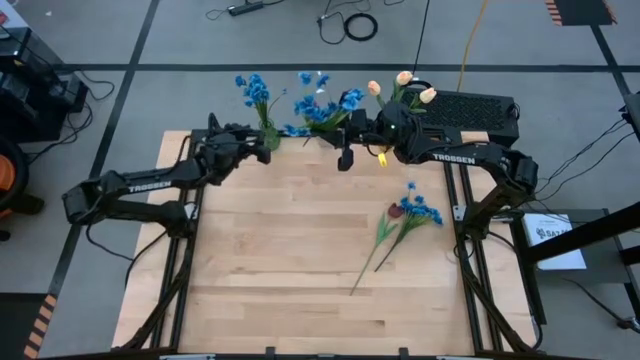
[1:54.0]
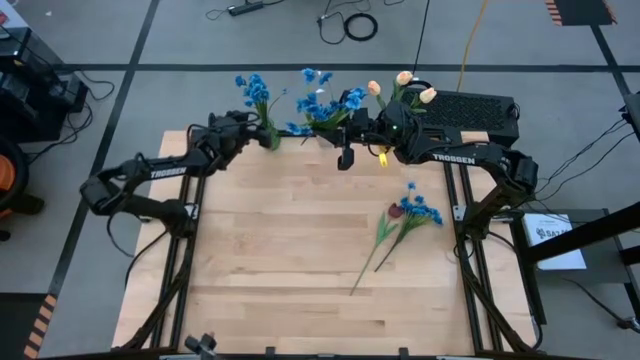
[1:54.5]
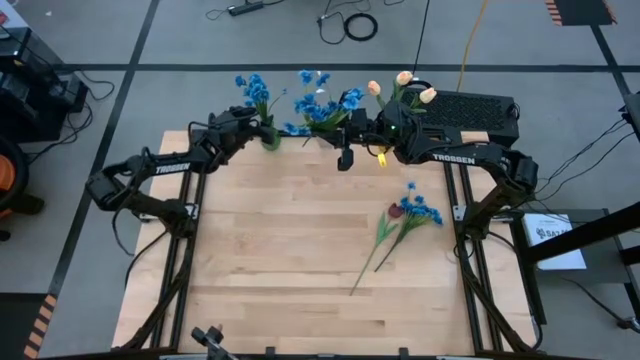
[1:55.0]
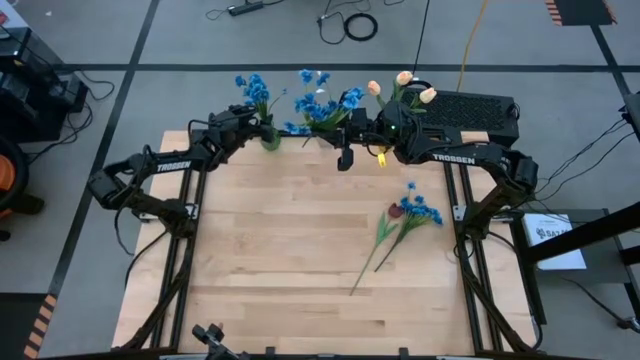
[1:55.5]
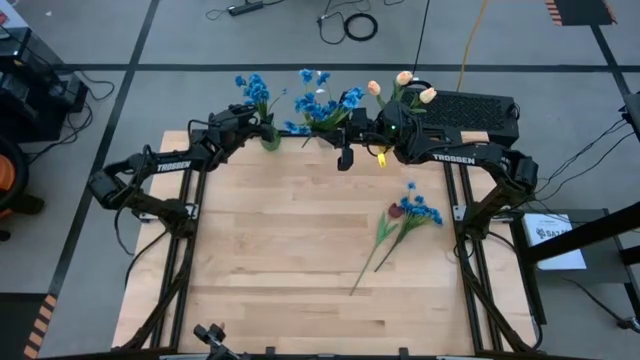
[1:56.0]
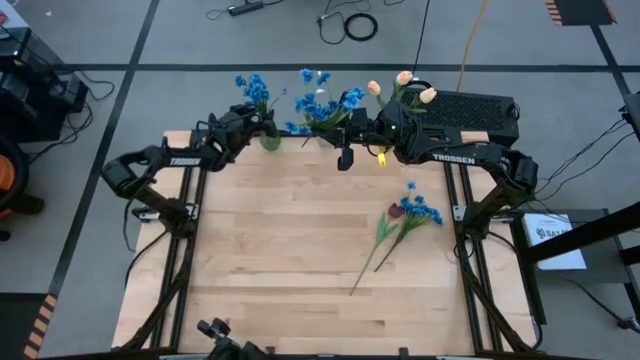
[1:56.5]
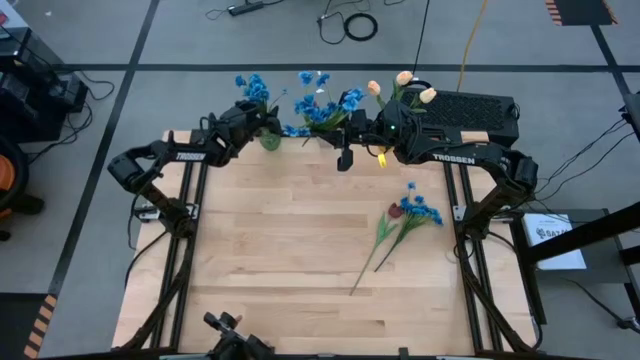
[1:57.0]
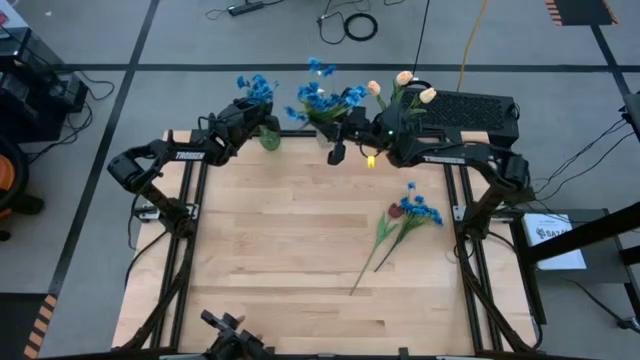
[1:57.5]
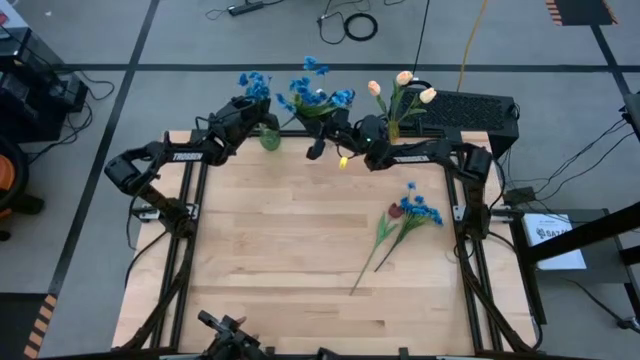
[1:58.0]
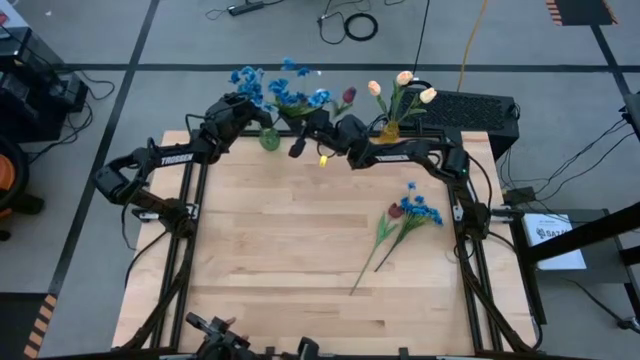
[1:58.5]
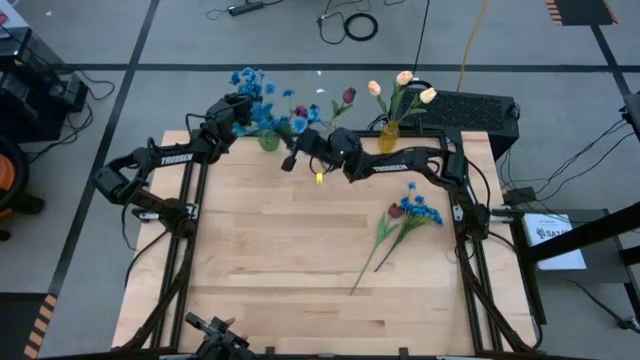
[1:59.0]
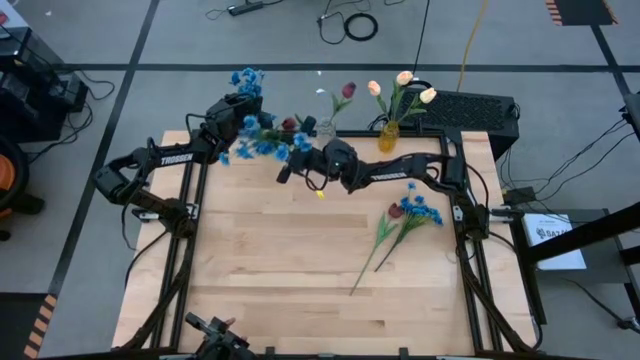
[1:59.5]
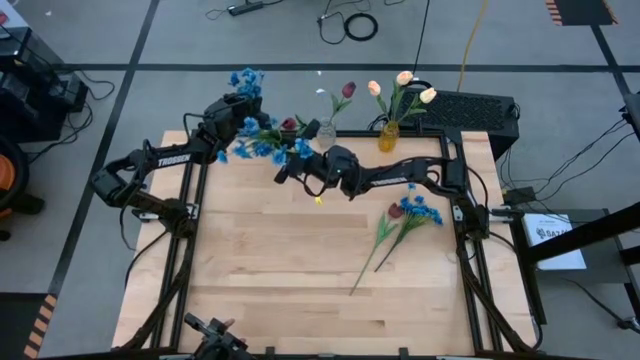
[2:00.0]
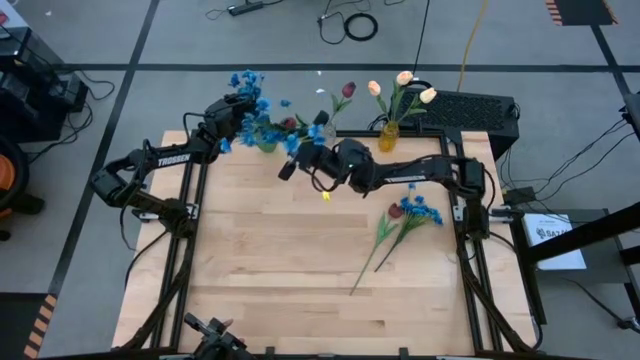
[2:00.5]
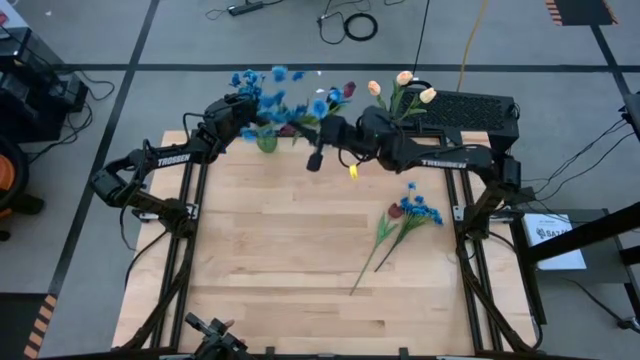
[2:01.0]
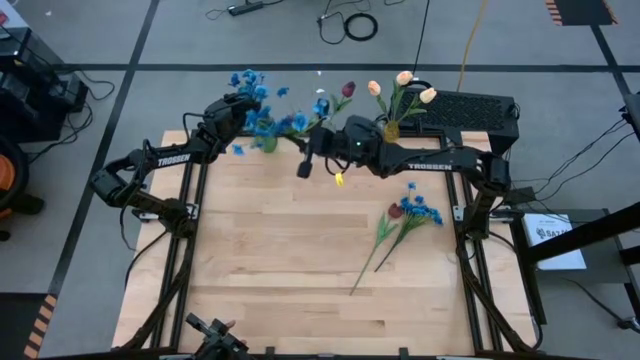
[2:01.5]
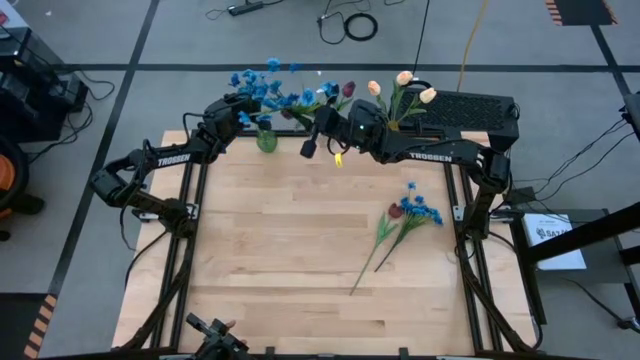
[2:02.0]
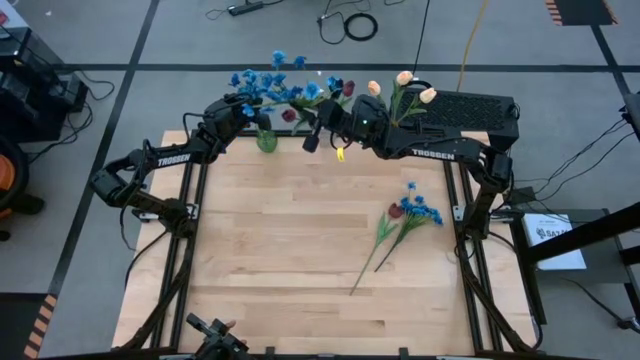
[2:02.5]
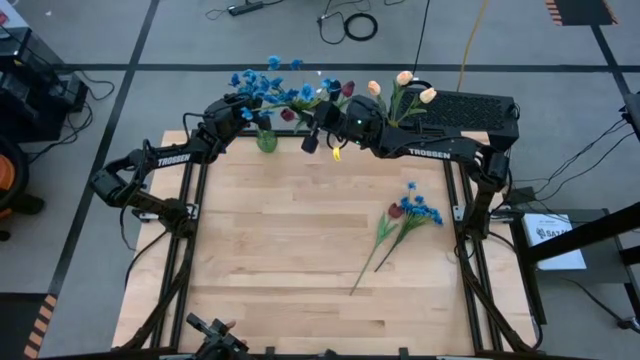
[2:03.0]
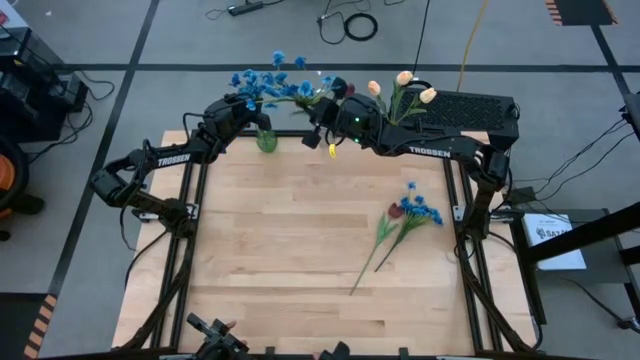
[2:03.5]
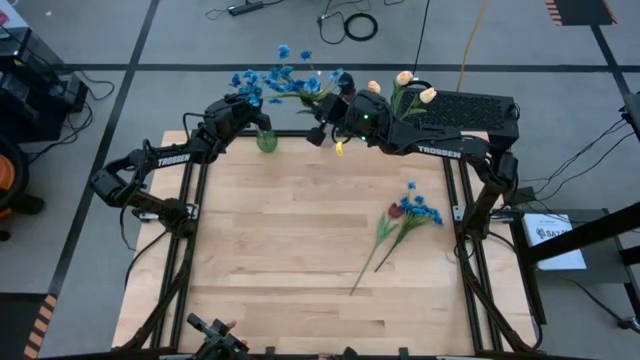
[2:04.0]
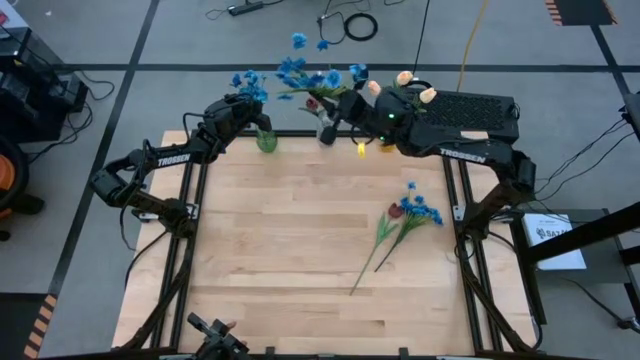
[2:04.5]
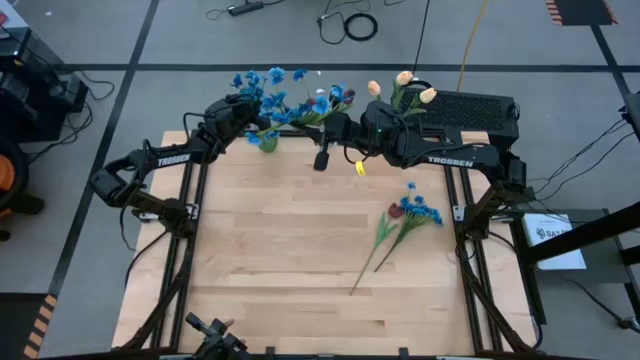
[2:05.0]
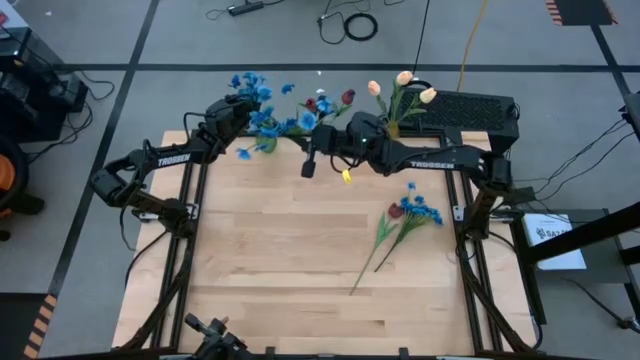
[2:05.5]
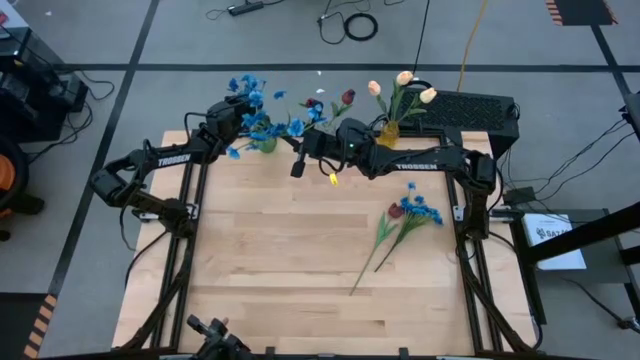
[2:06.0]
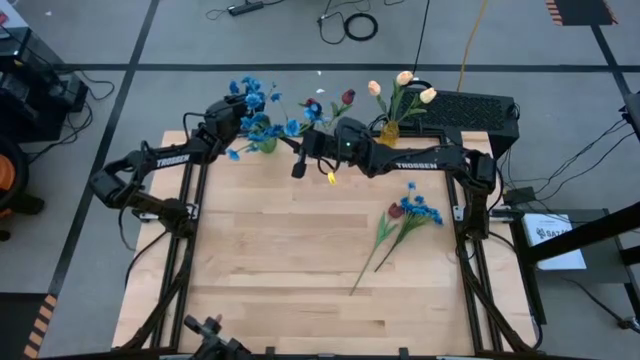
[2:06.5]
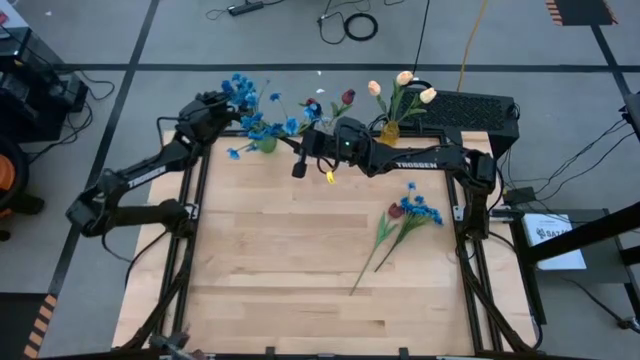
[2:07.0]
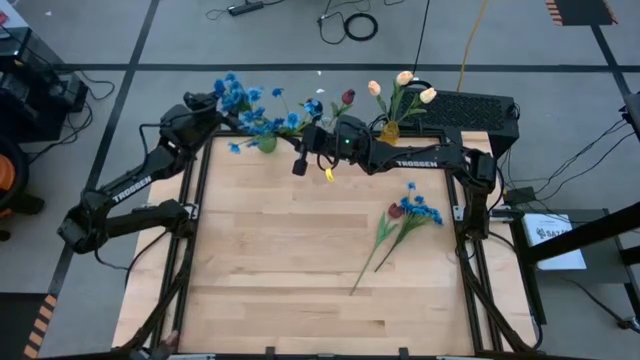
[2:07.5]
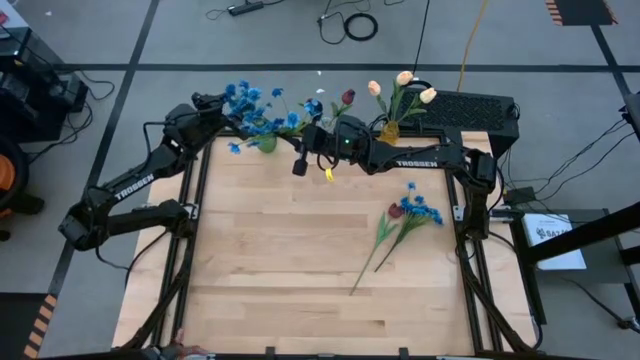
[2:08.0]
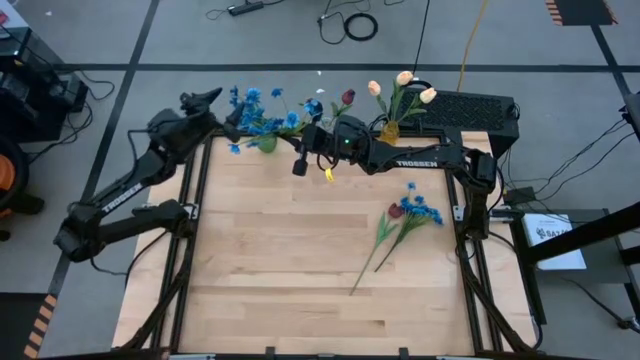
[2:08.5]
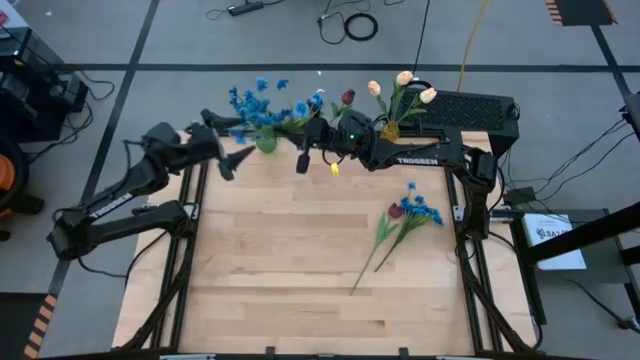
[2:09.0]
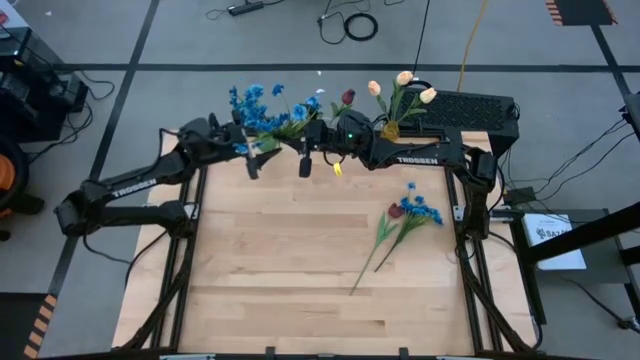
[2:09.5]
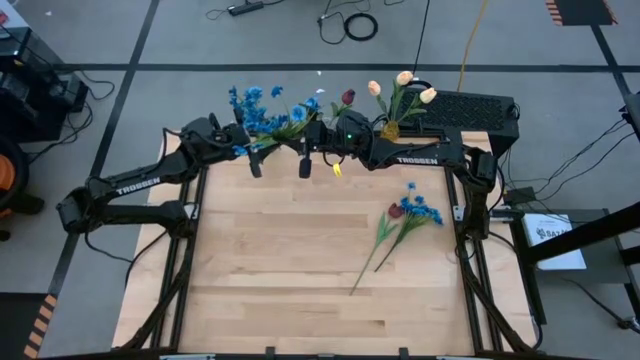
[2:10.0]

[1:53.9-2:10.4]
Task: Sort flowers into vase by color
Put the left blue flowers into the green vase

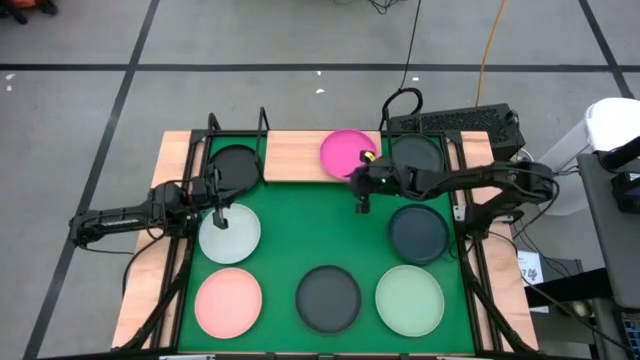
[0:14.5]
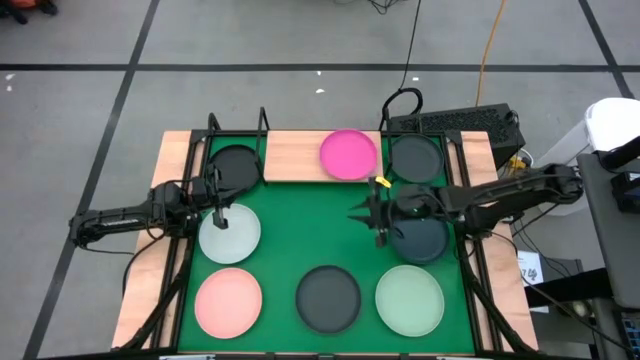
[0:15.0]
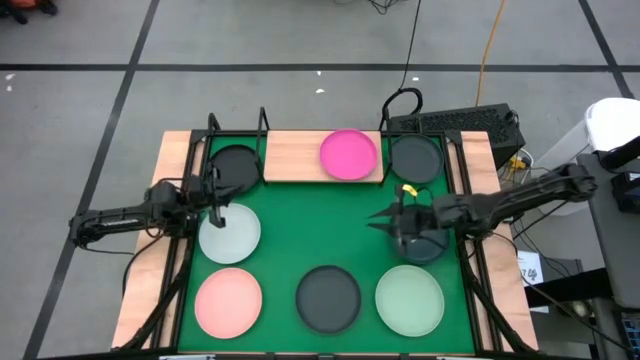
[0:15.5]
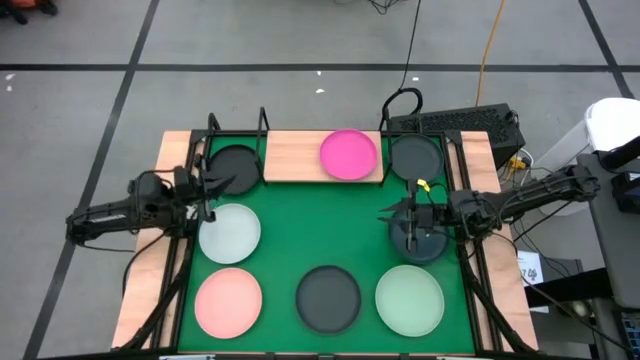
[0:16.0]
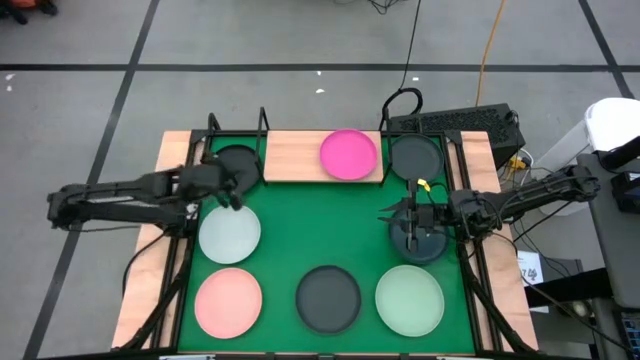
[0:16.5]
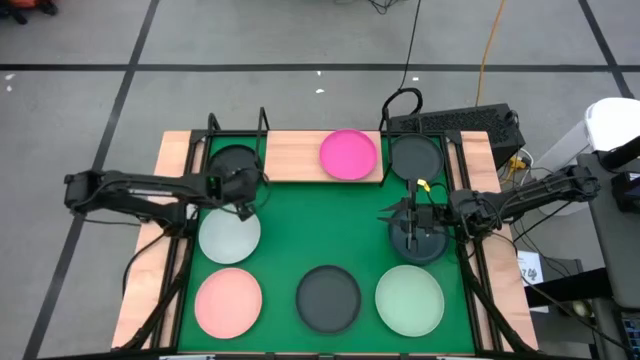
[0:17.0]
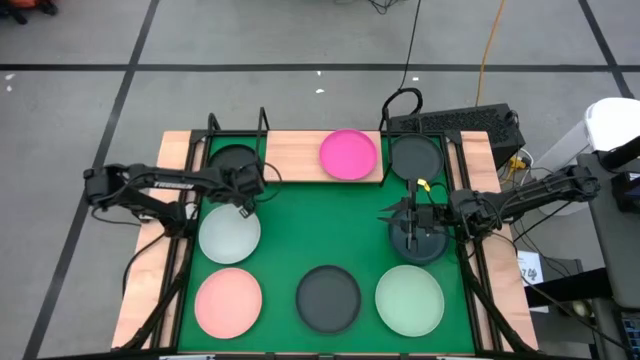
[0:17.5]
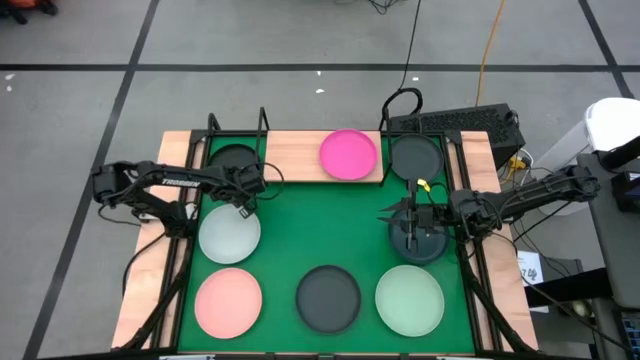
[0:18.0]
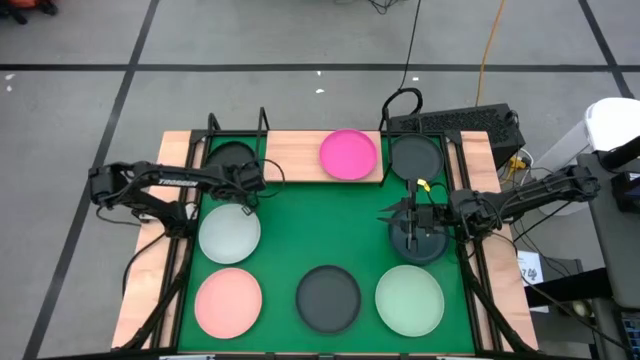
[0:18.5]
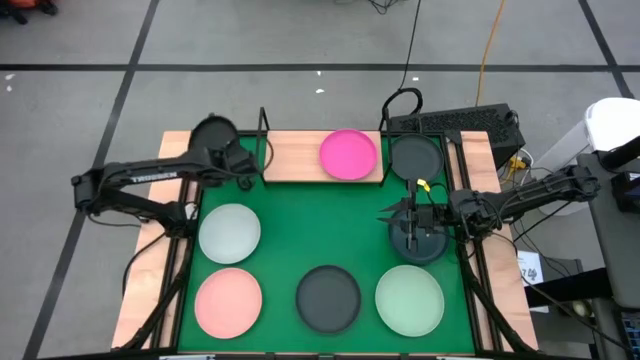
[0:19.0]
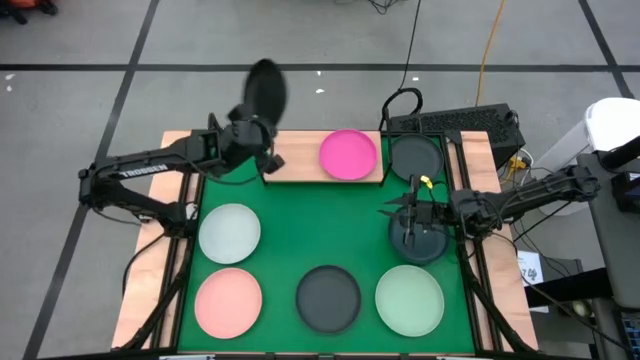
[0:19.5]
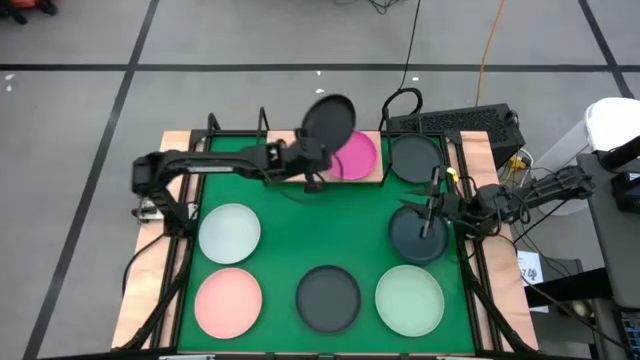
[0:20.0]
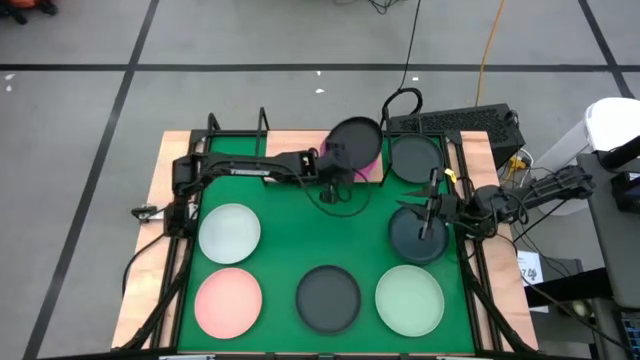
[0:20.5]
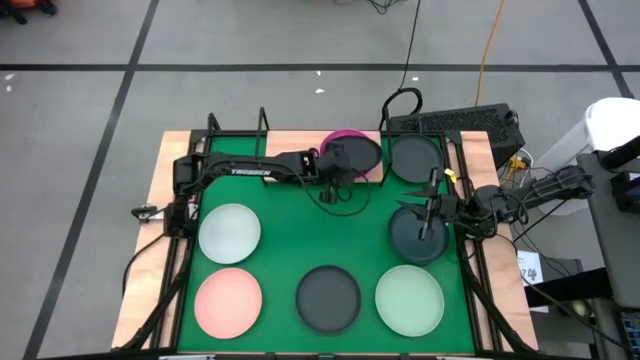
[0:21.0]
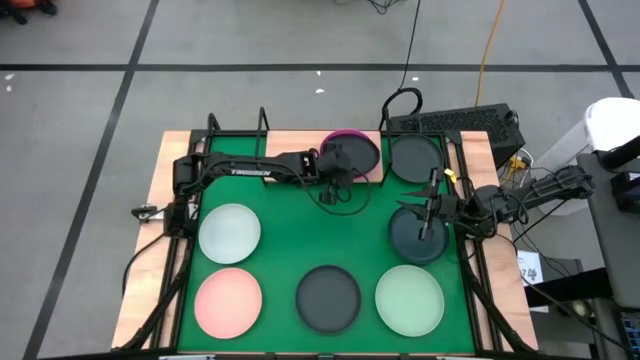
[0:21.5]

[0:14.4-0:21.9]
Task: Place and stack plates onto a shelf
Stack the black plate on top of the pink plate on the shelf
